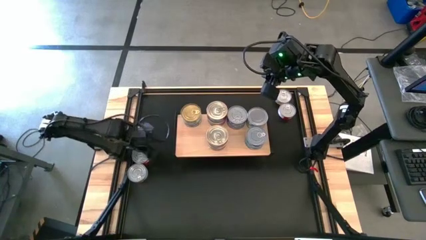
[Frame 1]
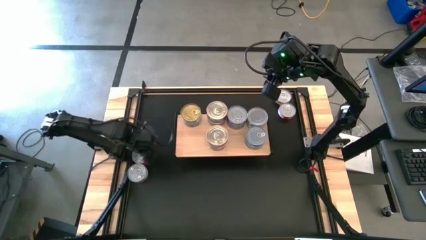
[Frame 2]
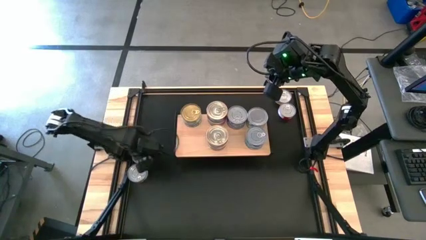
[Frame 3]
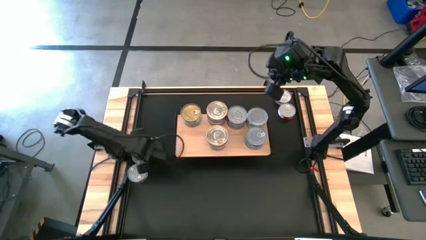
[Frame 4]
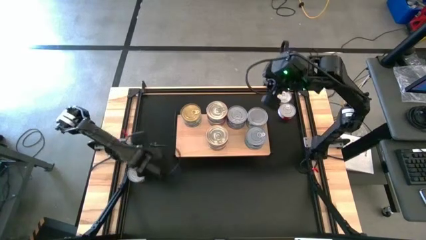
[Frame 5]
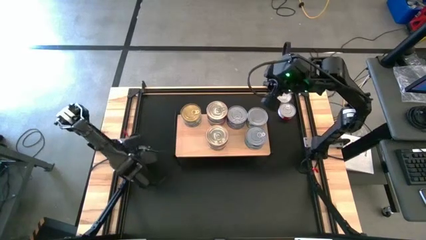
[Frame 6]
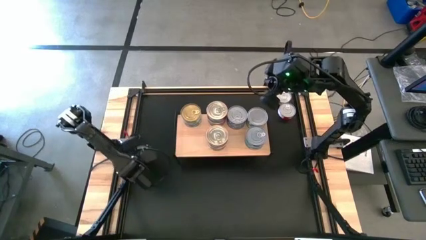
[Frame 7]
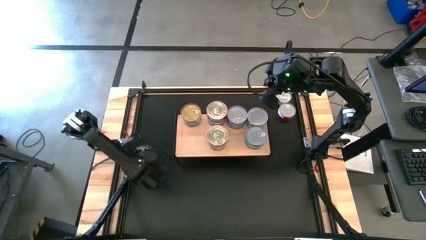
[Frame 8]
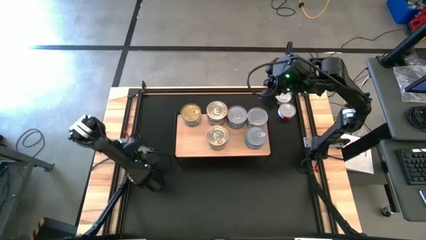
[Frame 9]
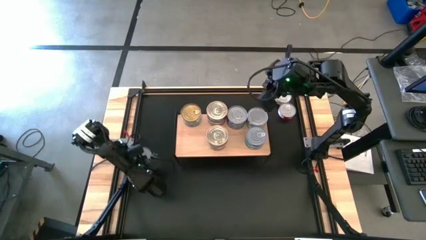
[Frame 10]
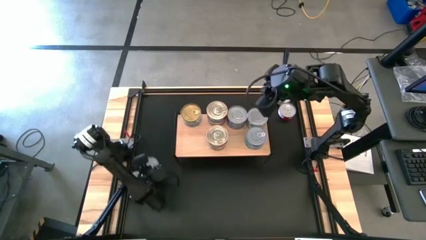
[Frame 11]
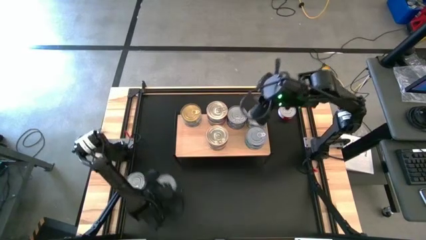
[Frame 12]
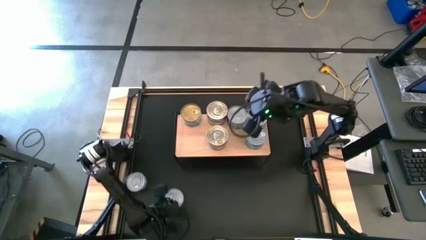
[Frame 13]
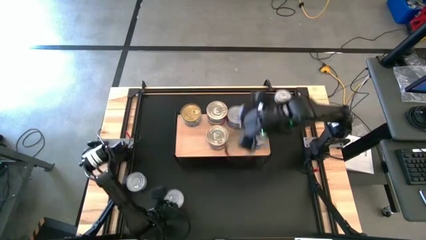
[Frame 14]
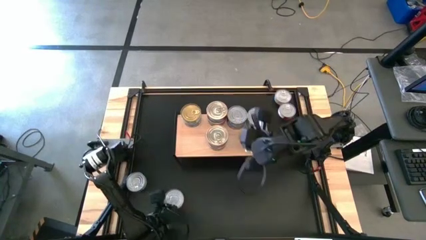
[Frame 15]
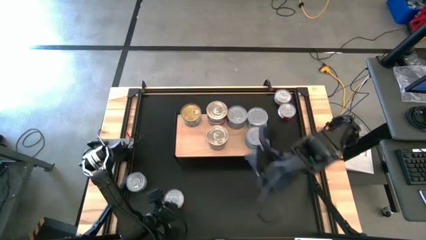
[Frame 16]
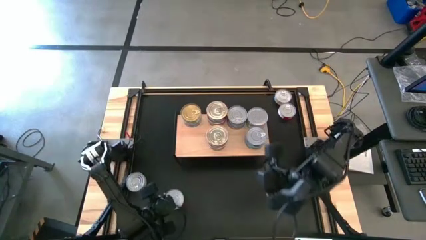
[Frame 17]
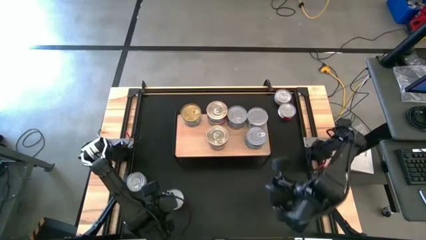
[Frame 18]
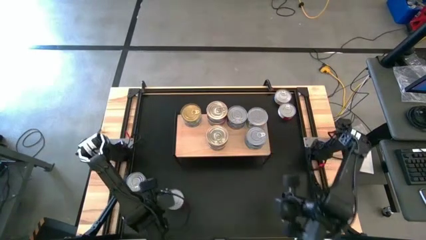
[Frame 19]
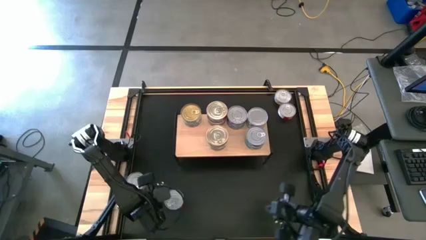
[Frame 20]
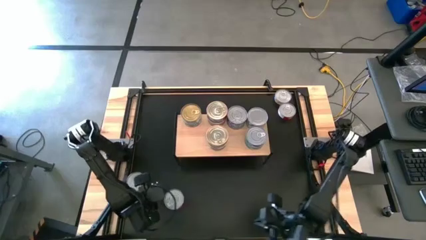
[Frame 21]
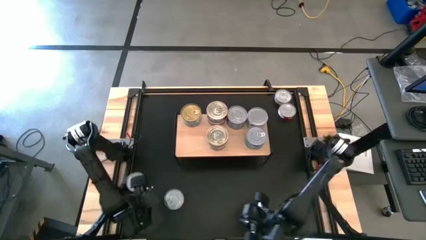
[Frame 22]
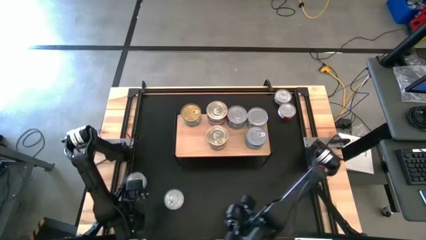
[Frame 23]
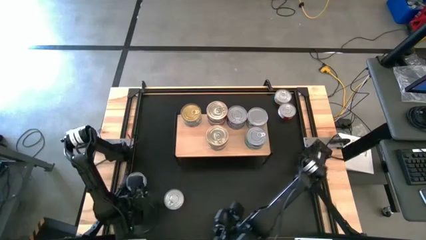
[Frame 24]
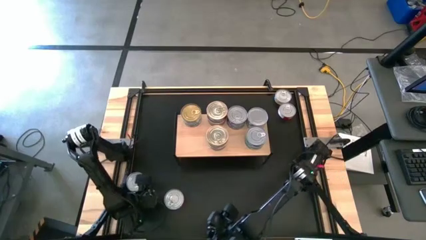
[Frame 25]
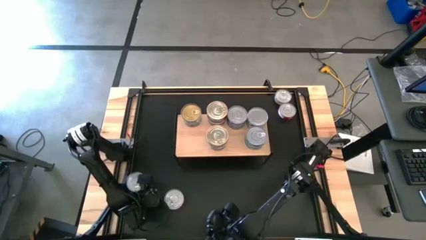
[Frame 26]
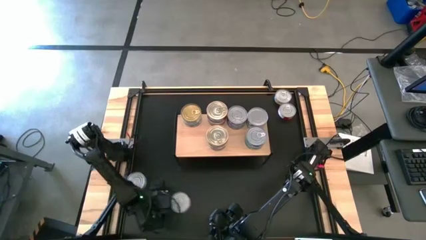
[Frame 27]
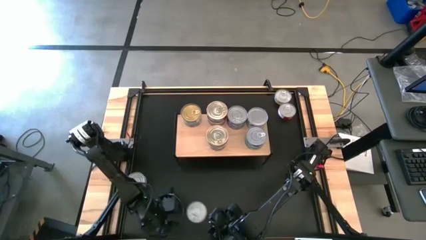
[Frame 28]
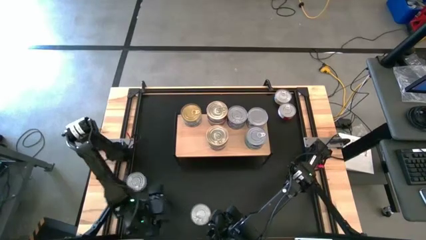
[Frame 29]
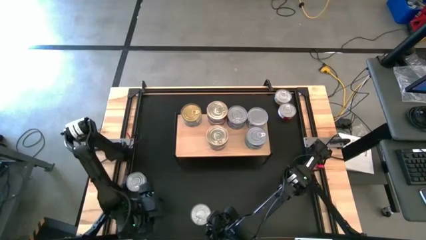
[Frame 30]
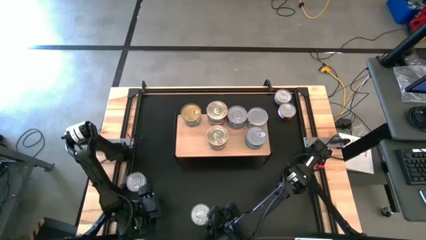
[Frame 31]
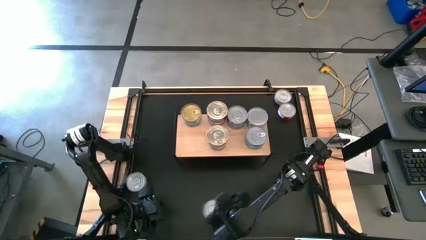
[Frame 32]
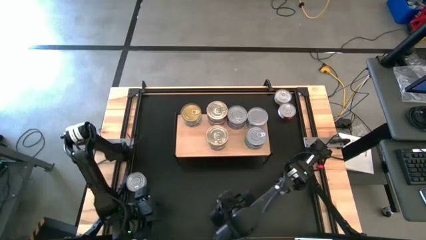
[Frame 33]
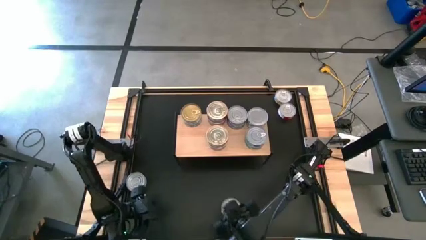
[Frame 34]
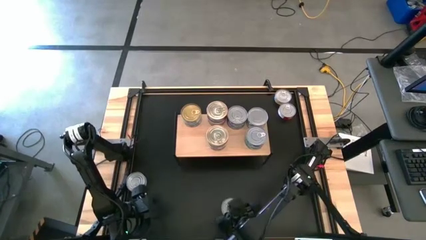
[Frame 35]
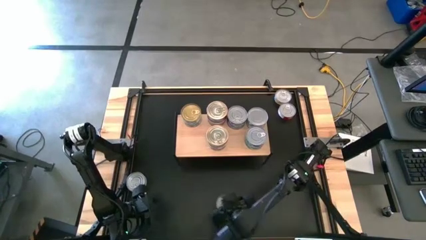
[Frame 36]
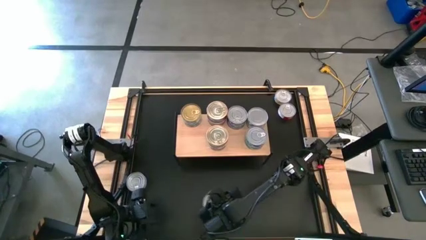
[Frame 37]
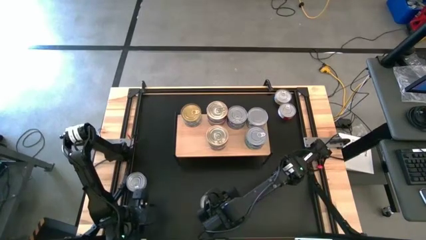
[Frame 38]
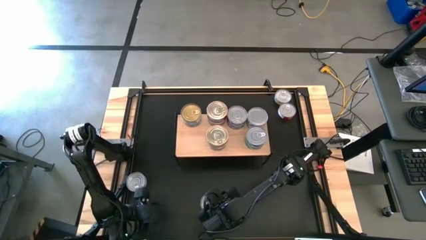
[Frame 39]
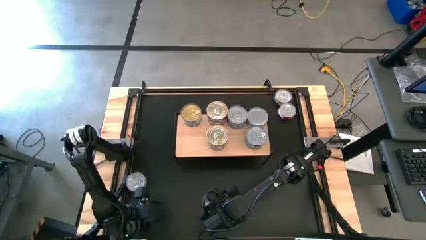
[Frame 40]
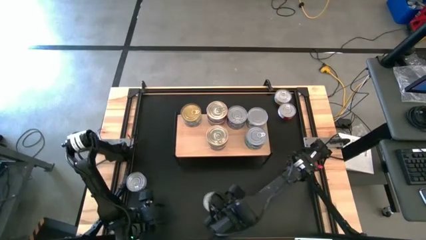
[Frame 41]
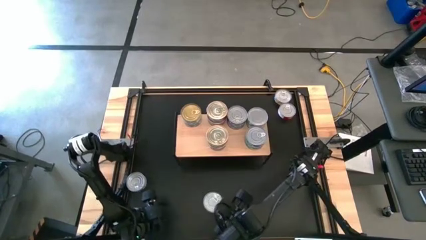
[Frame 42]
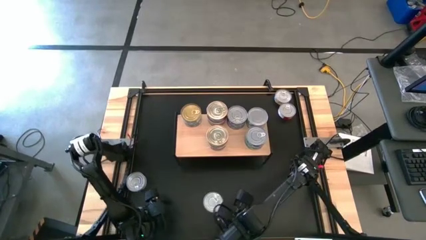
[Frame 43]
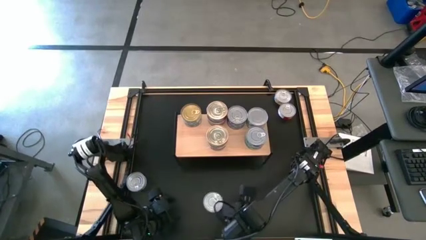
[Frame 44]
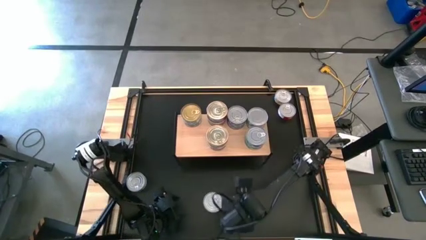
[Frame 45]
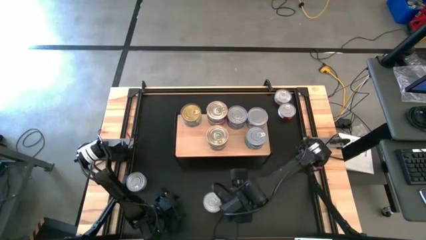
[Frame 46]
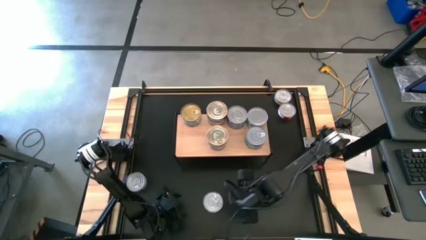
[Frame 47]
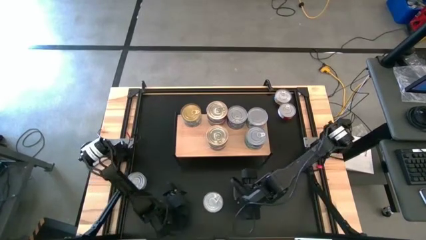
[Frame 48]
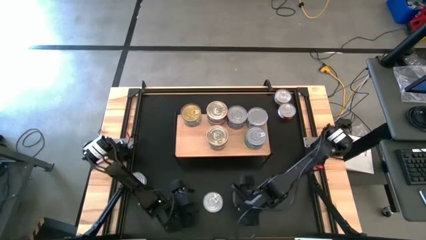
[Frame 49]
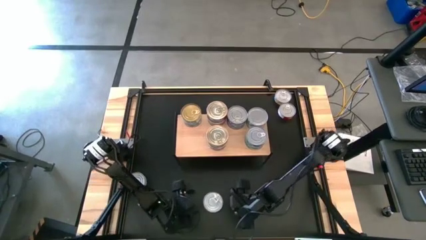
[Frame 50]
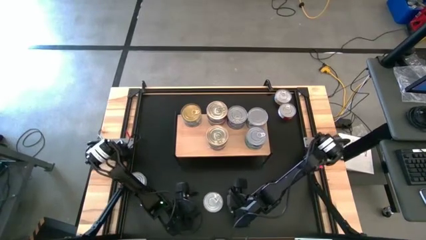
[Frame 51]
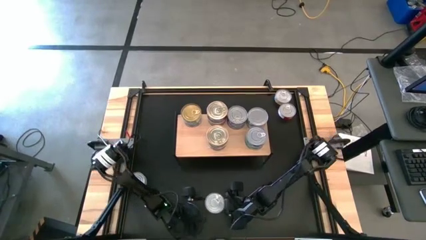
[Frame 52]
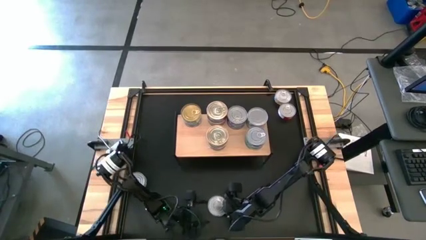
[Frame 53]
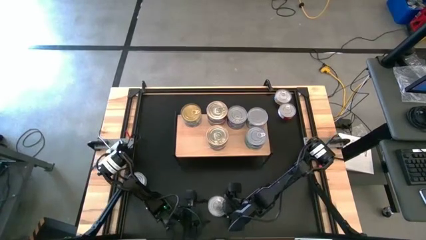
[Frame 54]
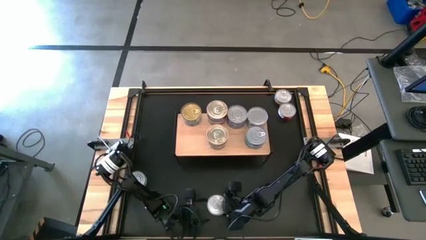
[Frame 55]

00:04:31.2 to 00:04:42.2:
Task: Stack canned seafood by type on shelf
Put the red tuna can on the shelf

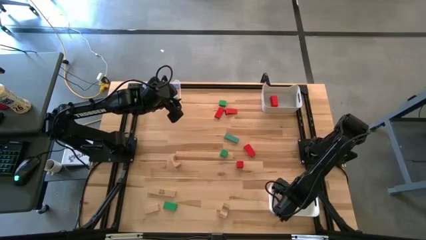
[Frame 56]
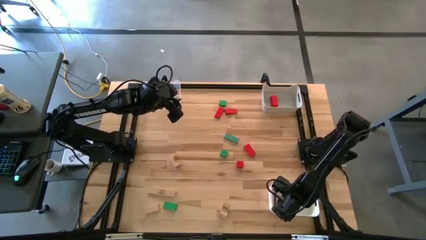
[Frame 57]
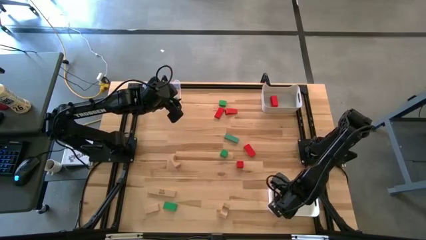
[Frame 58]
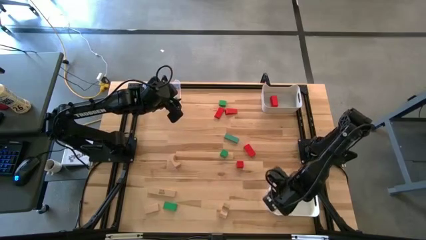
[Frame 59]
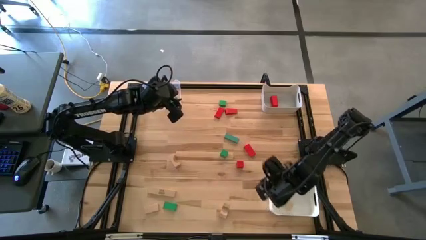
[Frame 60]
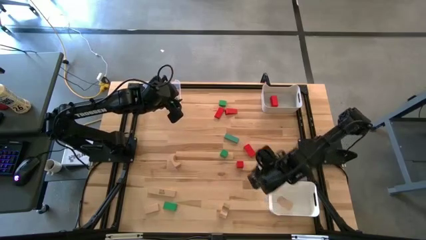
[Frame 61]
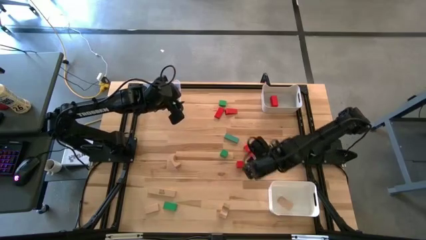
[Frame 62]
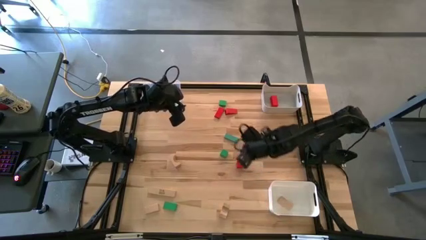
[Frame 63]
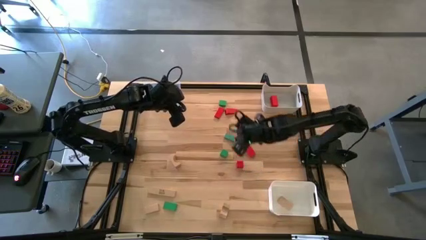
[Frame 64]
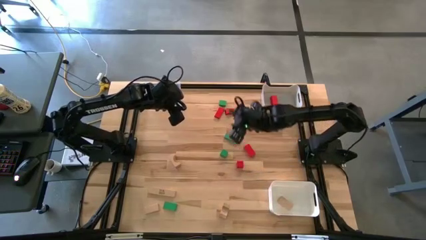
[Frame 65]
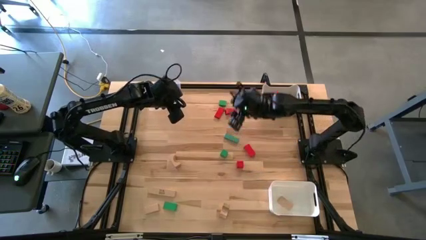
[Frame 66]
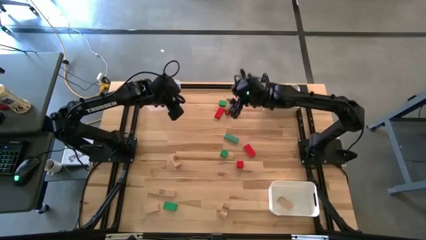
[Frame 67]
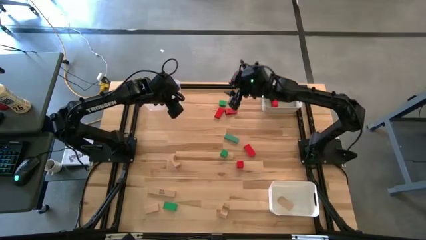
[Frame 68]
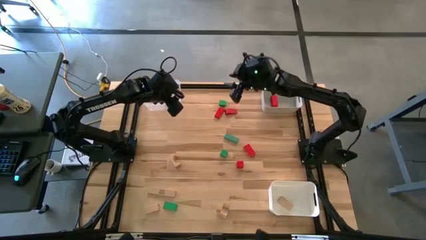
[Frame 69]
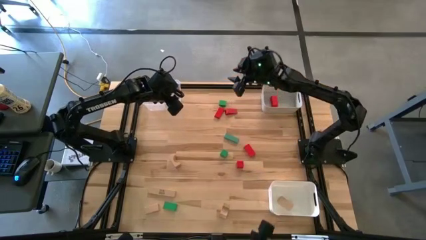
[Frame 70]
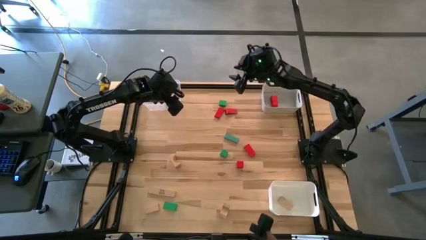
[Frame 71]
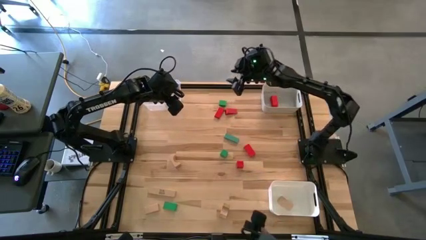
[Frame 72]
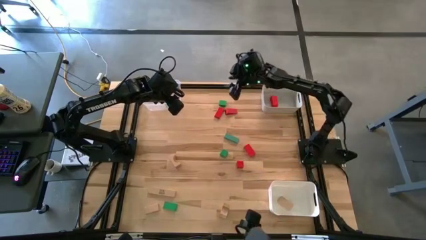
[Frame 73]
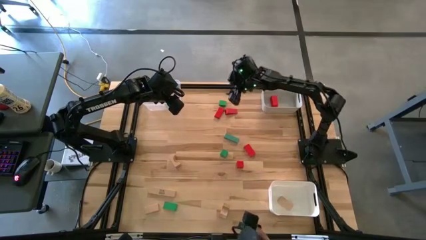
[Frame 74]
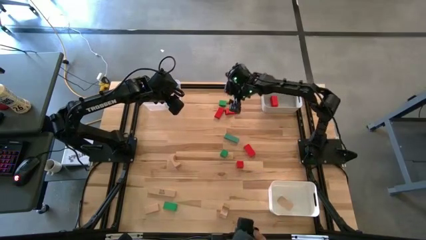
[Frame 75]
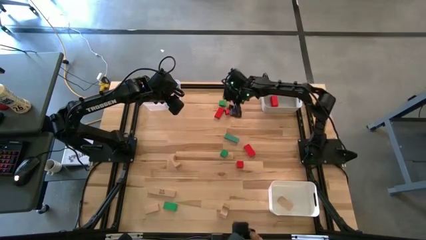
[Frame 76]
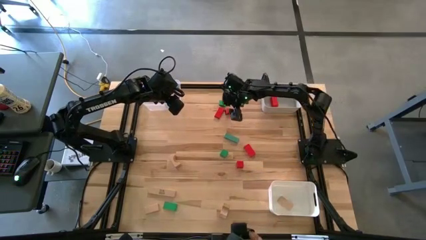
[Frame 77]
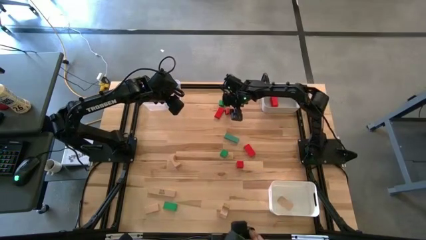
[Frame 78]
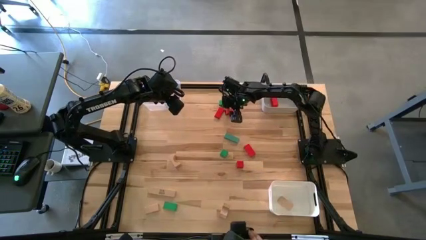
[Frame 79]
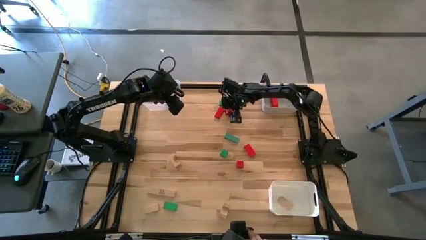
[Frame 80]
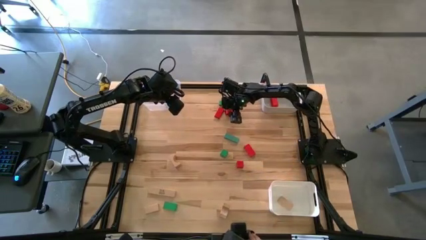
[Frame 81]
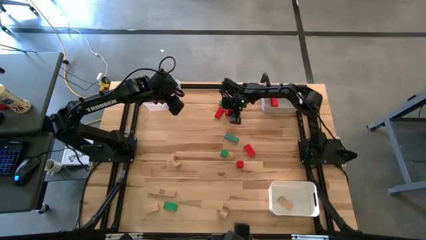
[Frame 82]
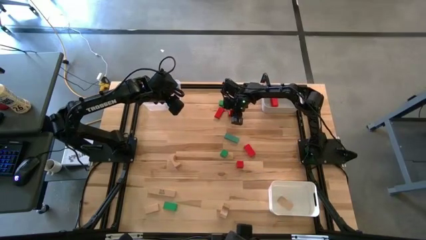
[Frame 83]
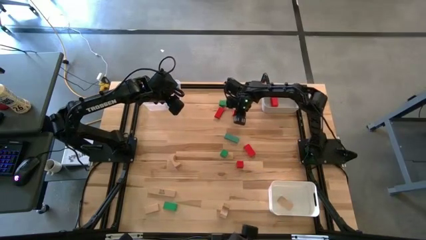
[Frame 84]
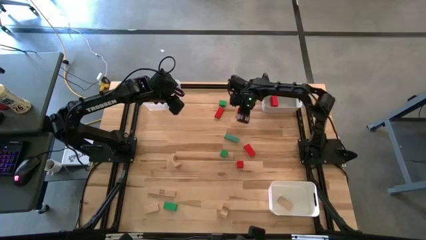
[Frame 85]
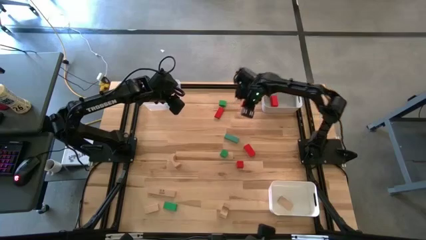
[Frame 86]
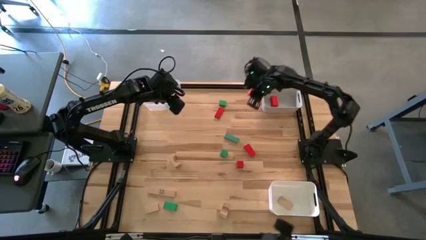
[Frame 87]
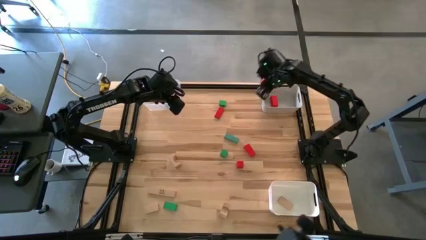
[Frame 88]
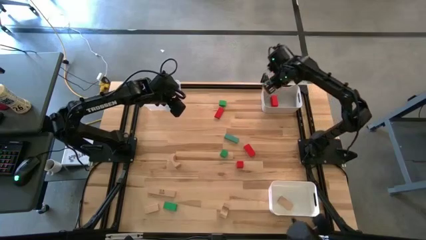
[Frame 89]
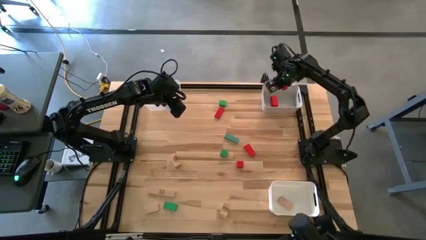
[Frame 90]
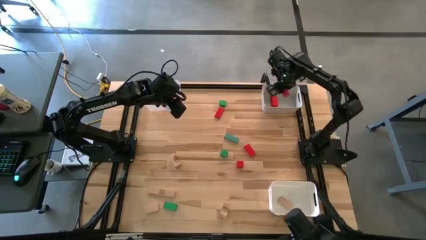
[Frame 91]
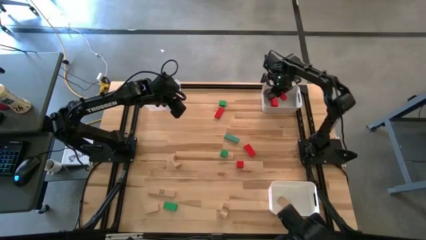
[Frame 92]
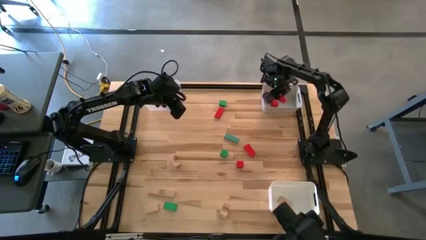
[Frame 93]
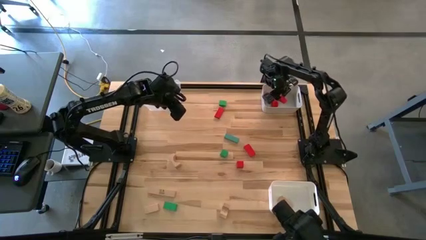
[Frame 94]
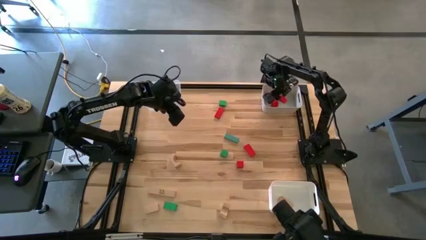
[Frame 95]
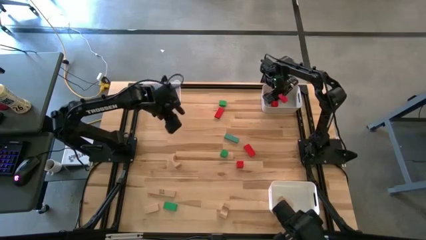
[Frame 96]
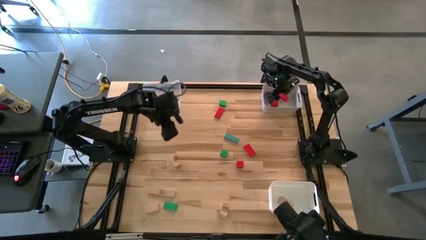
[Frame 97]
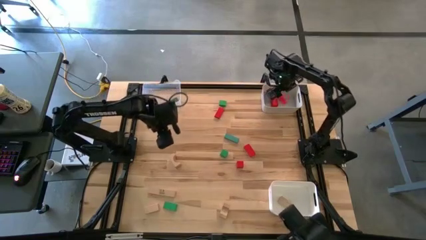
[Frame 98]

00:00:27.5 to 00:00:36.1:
Task: Sort & place blocks by color
Put the red block into the gray bin
